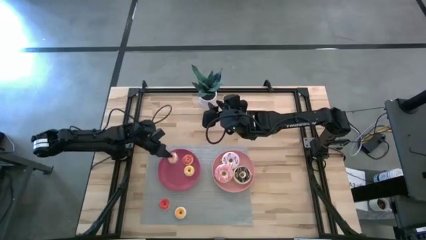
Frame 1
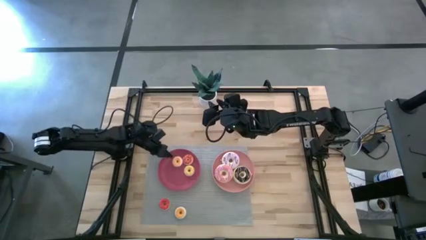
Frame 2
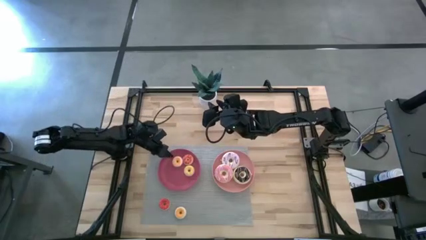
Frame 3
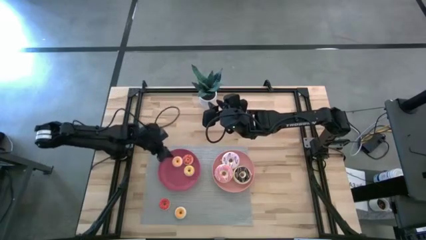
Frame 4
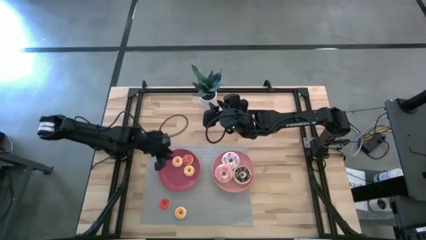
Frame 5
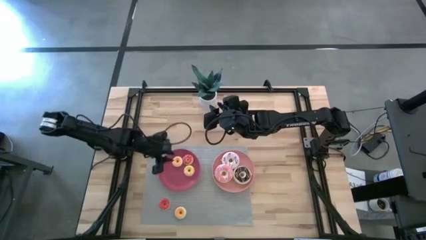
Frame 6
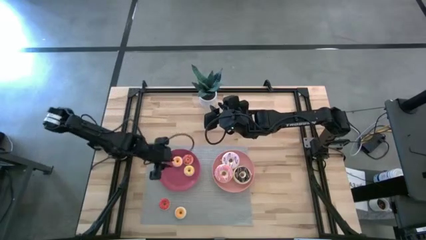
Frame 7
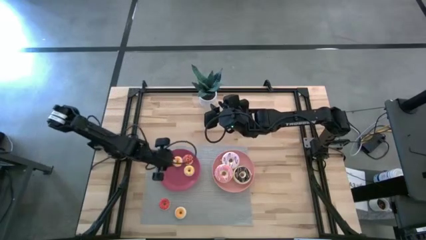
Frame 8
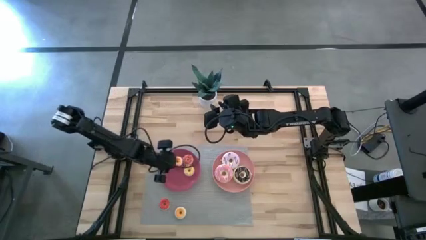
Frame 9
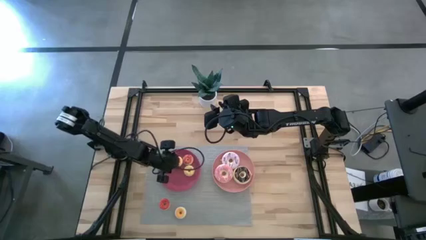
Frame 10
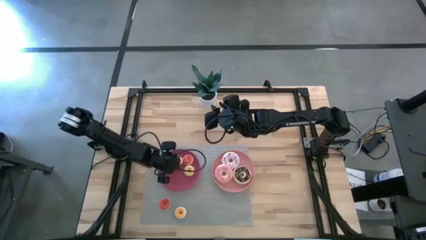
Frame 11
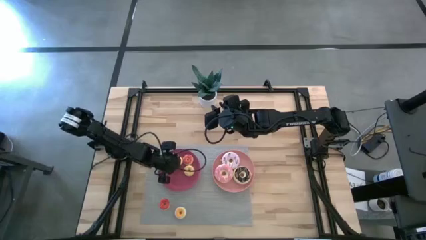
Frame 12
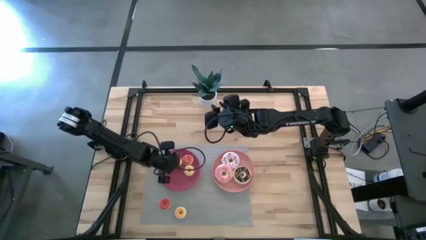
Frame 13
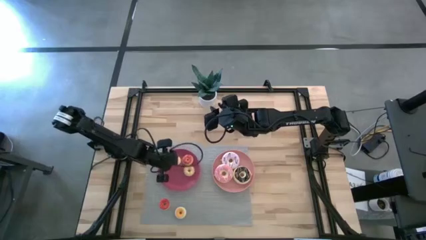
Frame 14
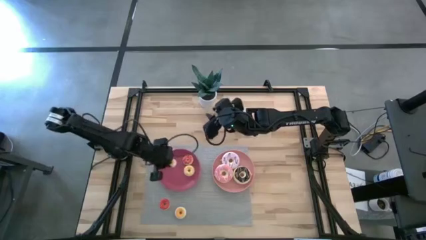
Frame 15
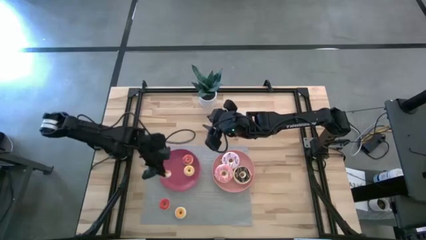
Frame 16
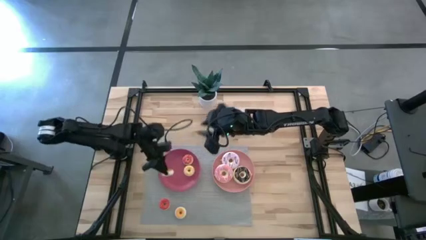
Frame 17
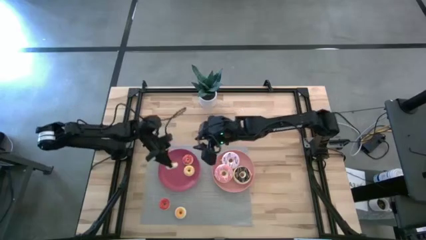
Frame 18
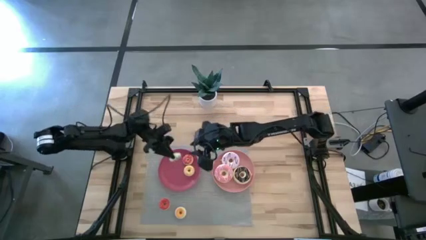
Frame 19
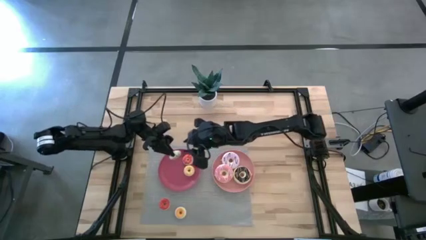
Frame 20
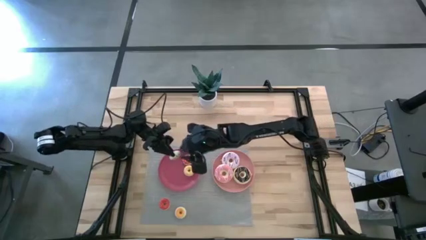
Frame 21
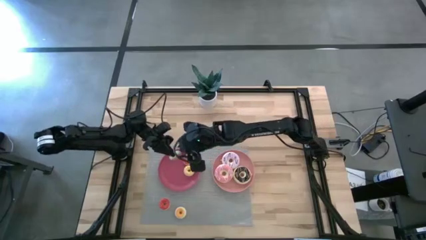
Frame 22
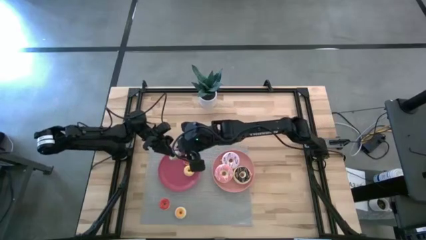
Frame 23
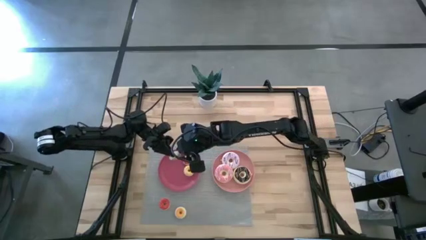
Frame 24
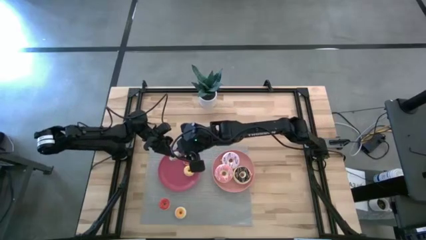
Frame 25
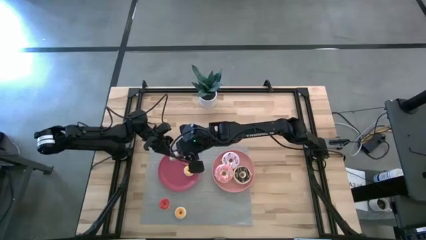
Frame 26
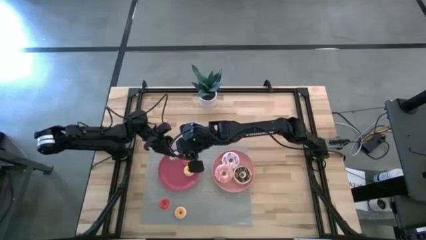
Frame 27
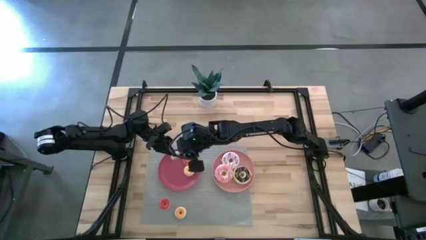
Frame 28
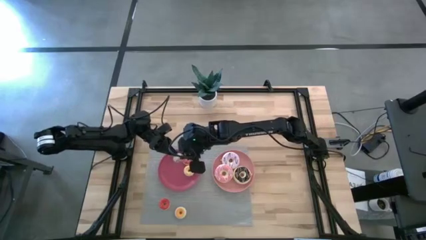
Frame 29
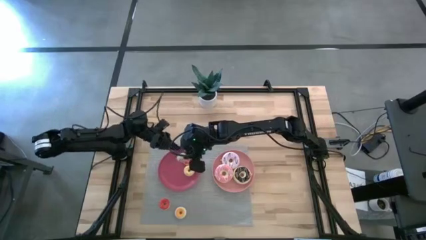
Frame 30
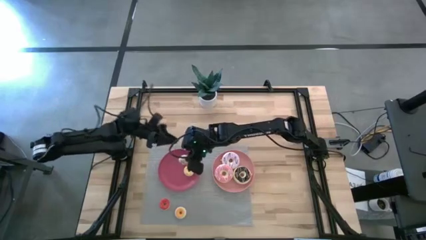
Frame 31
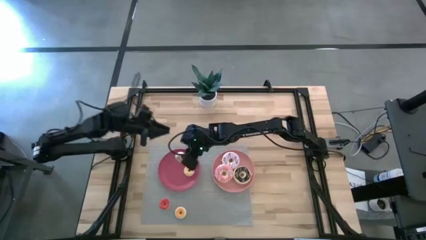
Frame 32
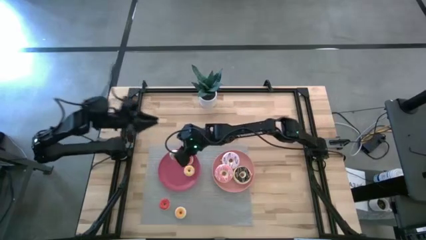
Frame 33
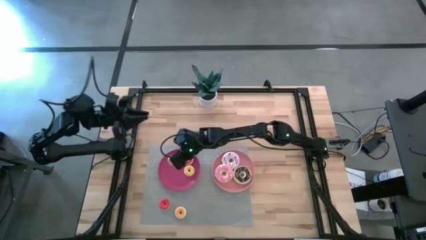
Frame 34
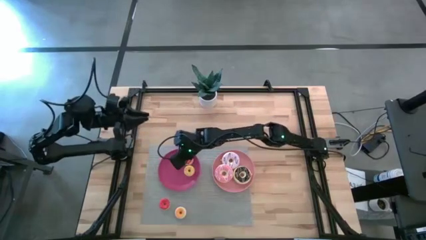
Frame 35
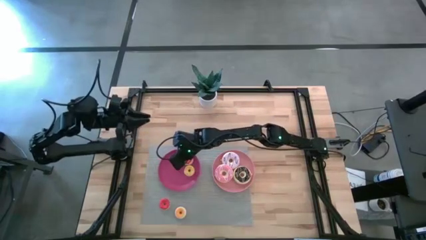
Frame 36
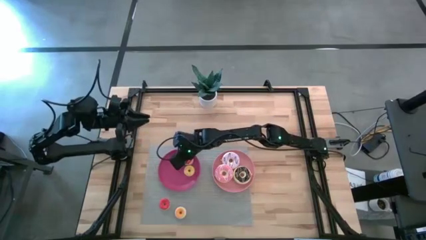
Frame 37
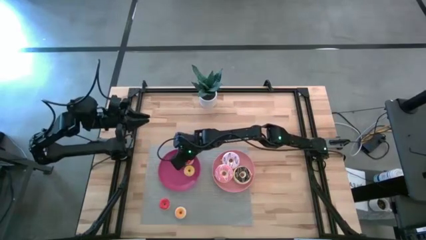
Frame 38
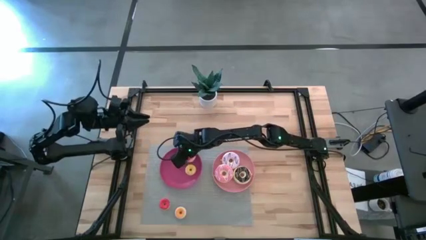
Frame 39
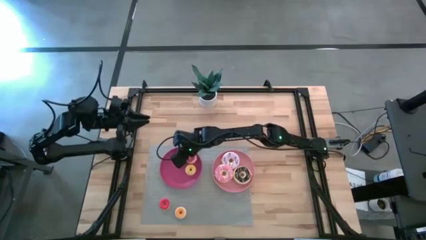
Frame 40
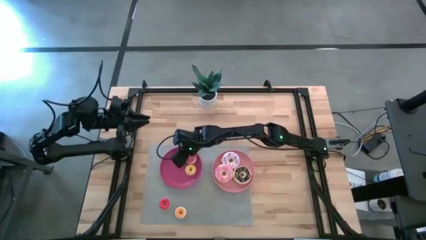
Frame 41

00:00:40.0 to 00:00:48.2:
Task: Pick & Place donuts
Put the small white donut on the dark pink plate

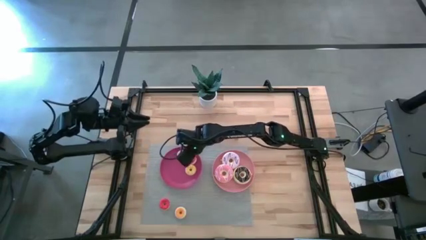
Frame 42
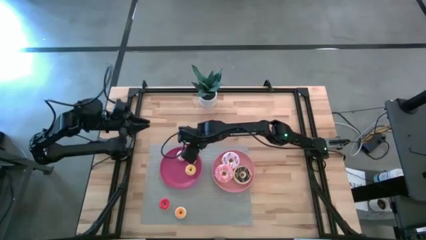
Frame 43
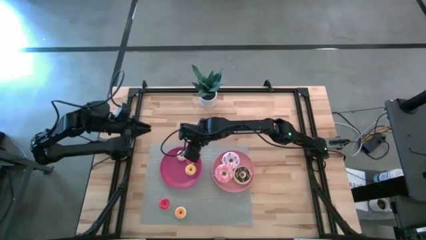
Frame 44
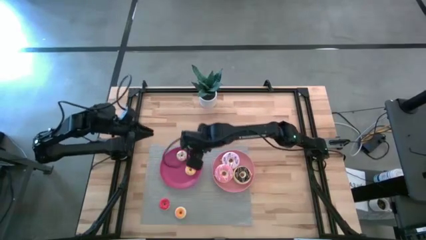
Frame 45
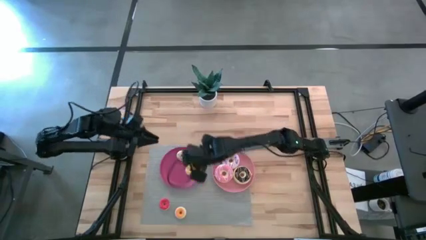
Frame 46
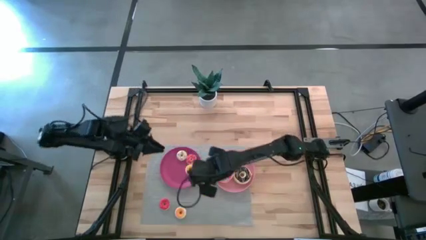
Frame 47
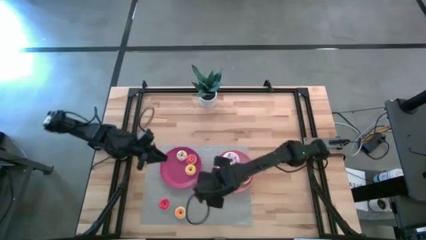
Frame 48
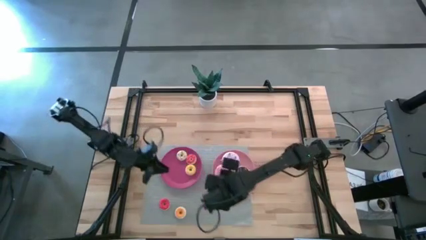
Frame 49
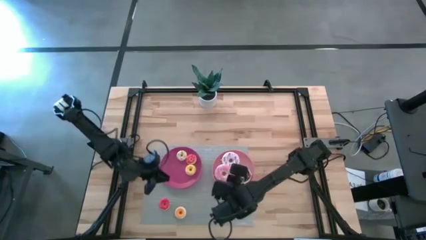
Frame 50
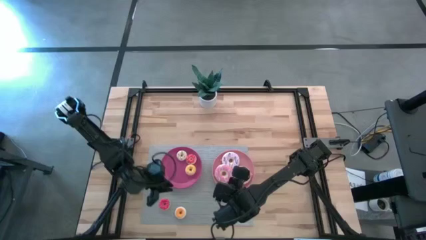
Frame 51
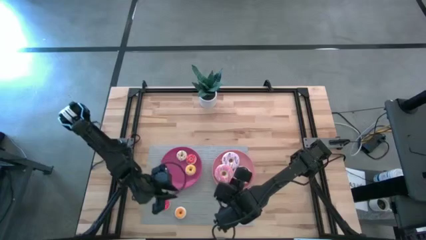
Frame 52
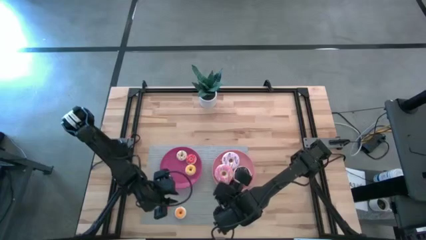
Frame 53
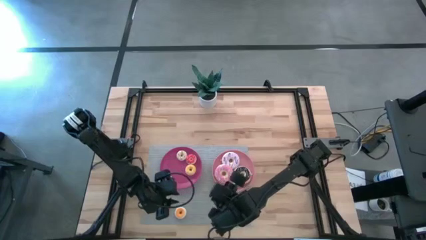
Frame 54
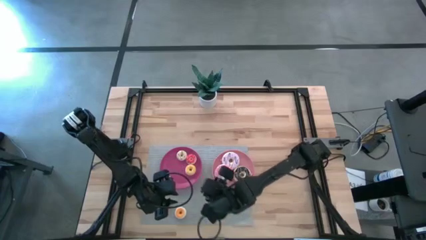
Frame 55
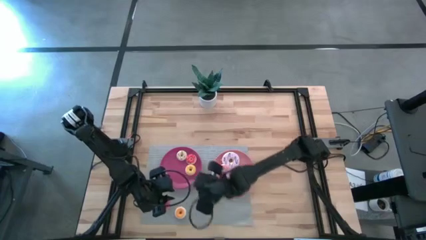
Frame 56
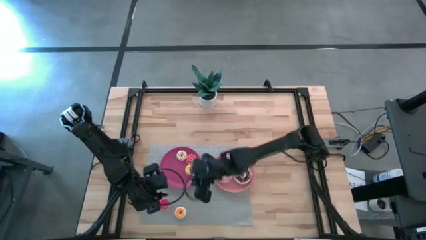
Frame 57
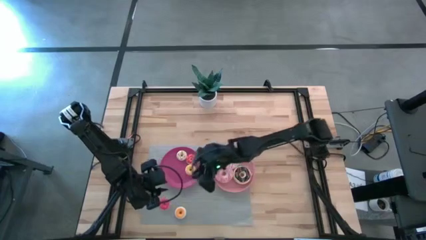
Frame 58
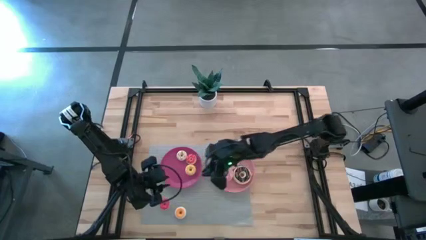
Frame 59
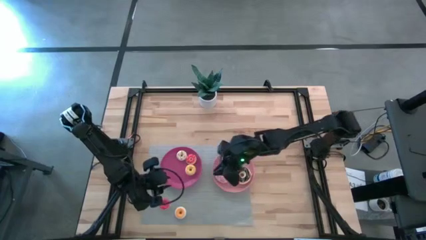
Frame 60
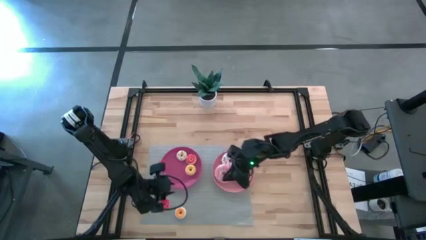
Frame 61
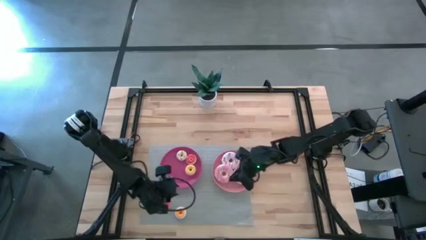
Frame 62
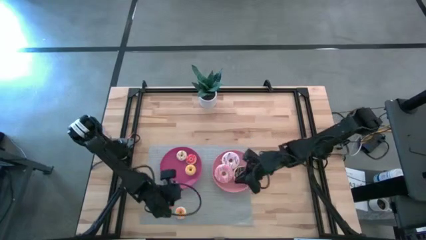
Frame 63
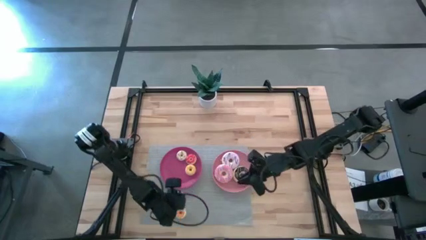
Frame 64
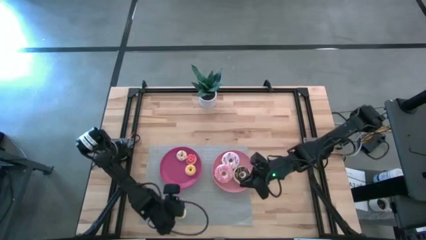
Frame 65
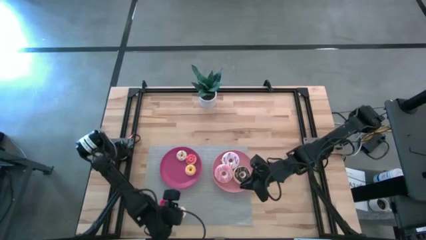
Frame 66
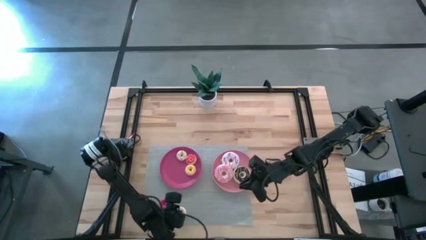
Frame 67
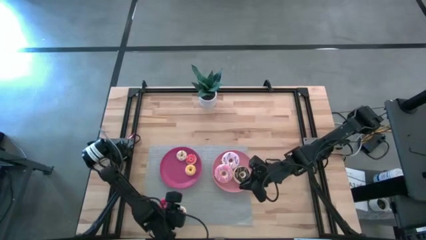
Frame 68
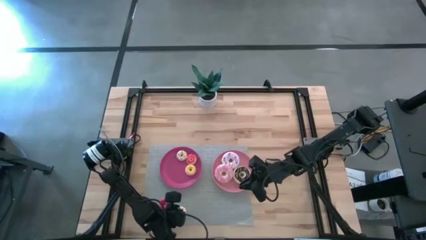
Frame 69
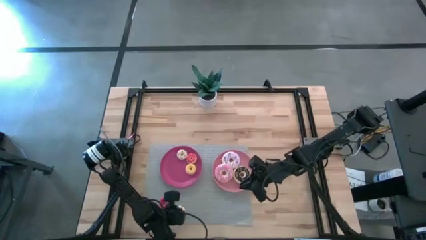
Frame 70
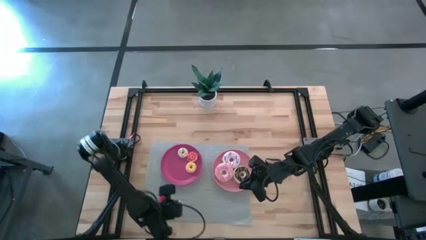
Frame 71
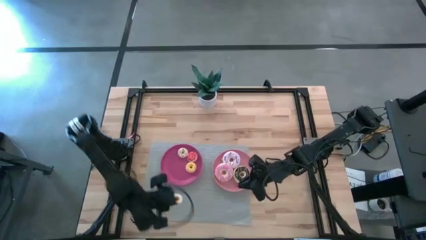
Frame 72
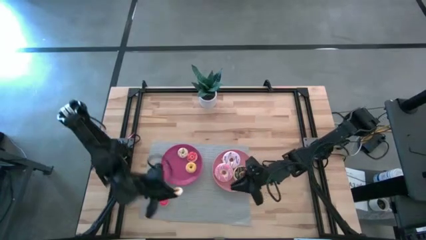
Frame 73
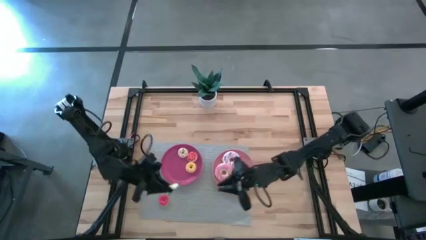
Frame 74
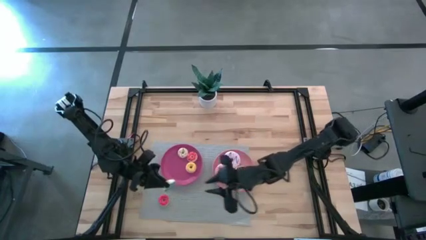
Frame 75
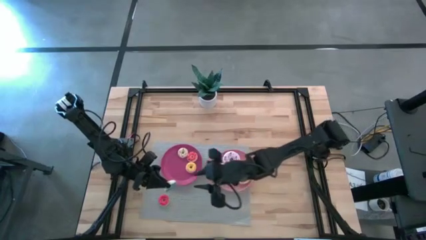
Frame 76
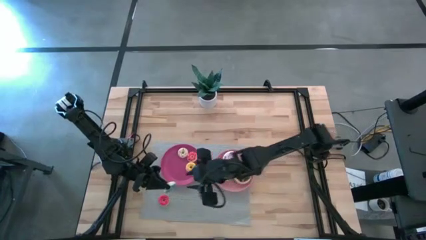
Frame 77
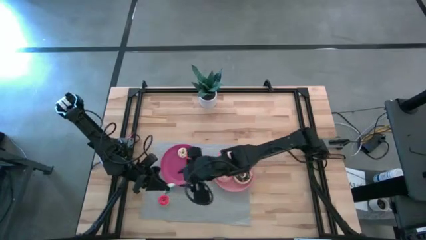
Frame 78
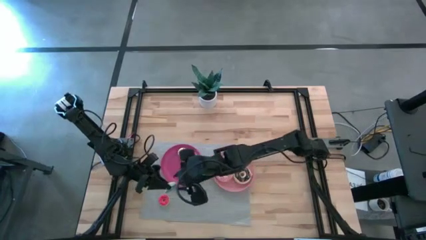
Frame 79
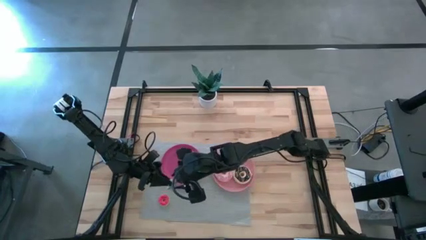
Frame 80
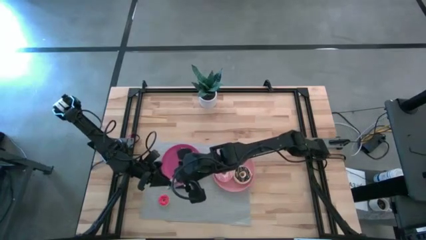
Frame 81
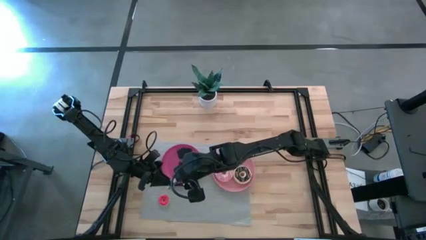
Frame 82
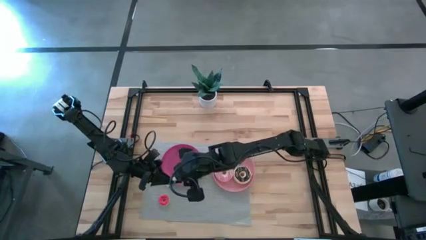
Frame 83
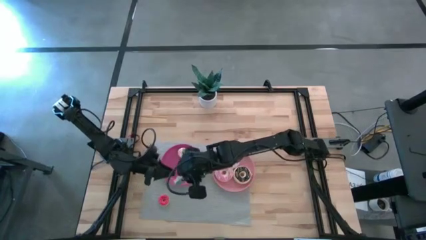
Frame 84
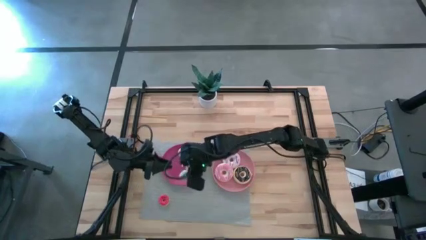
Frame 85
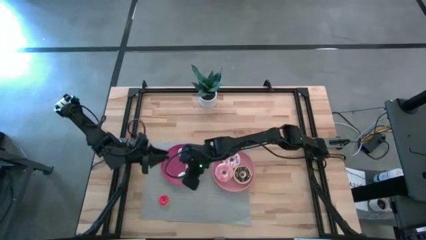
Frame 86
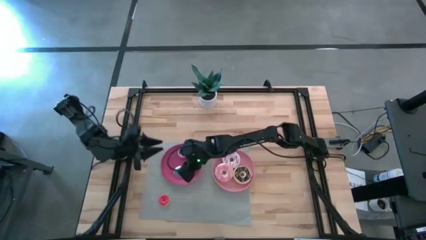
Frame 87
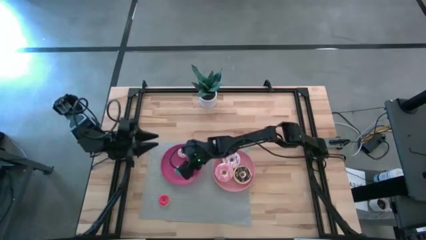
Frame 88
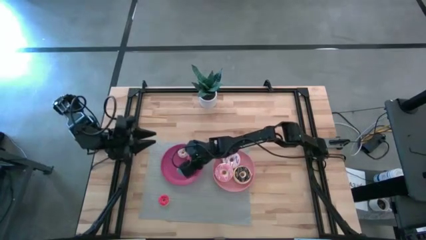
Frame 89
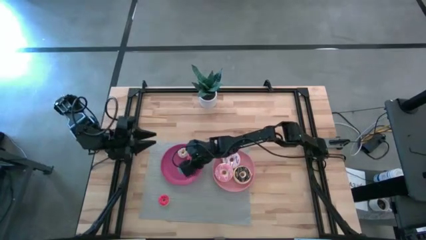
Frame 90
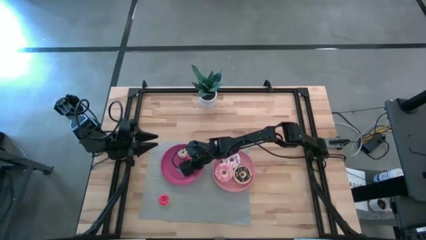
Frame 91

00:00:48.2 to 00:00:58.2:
Put the small blue donut on the dark pink plate
